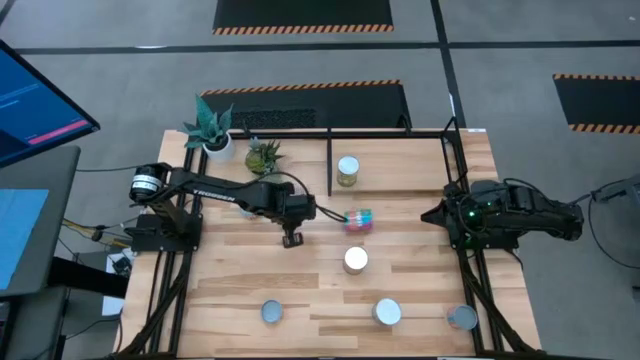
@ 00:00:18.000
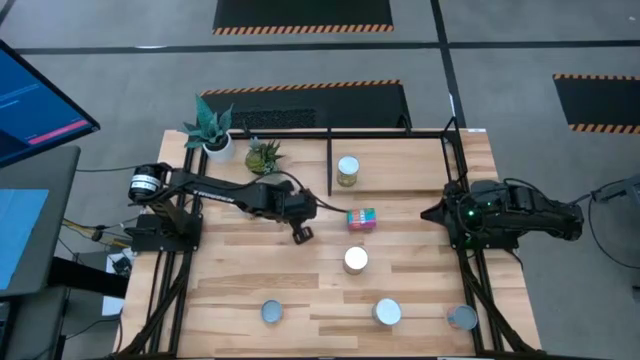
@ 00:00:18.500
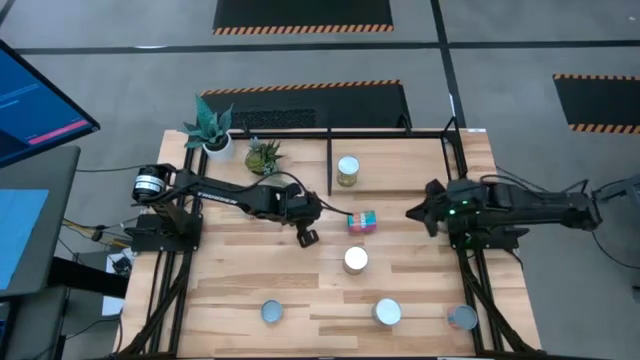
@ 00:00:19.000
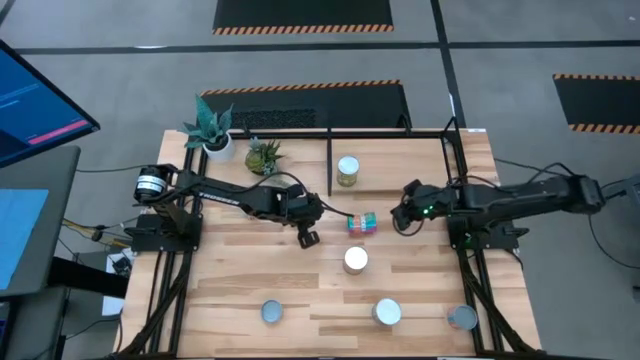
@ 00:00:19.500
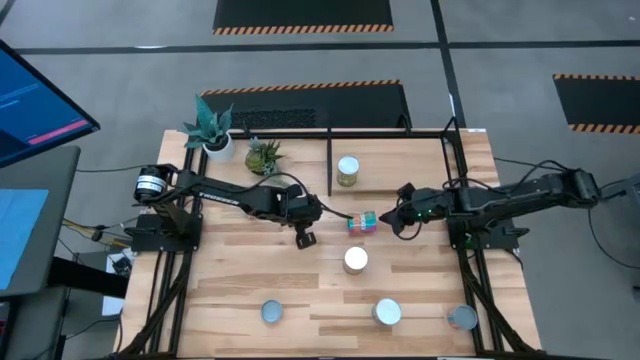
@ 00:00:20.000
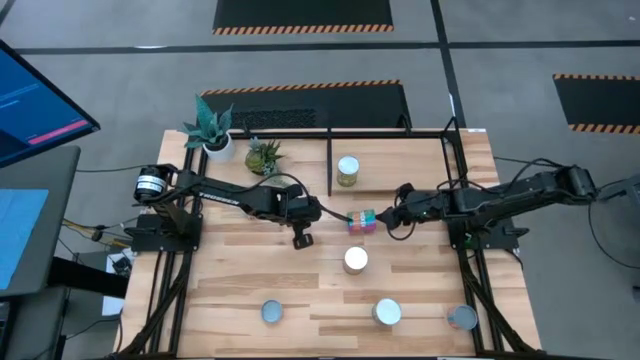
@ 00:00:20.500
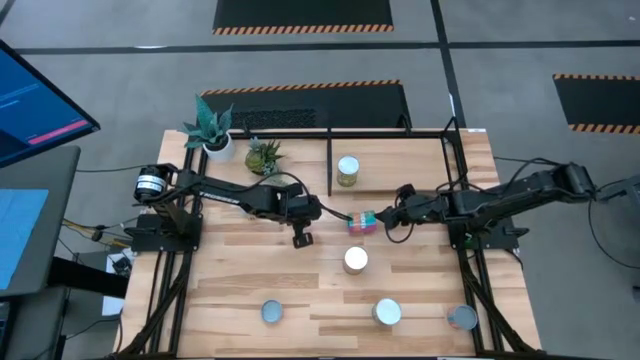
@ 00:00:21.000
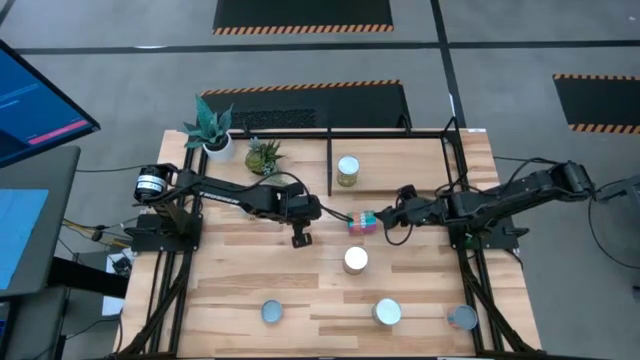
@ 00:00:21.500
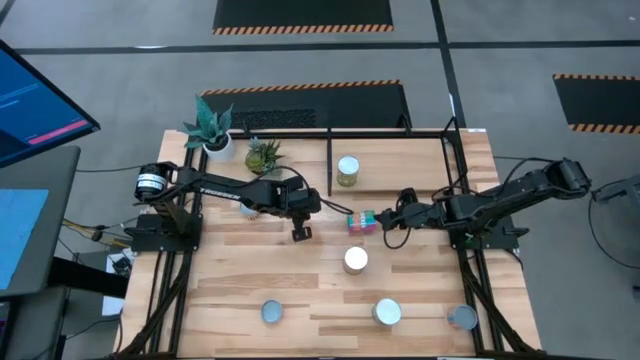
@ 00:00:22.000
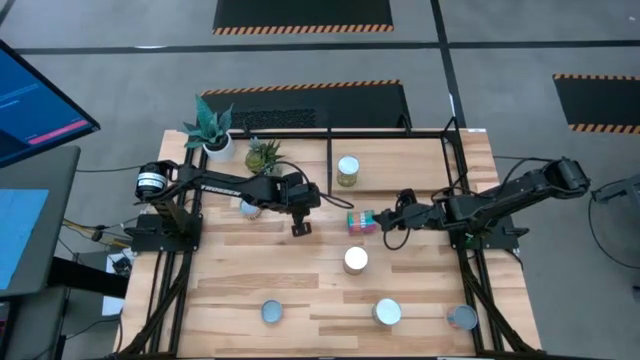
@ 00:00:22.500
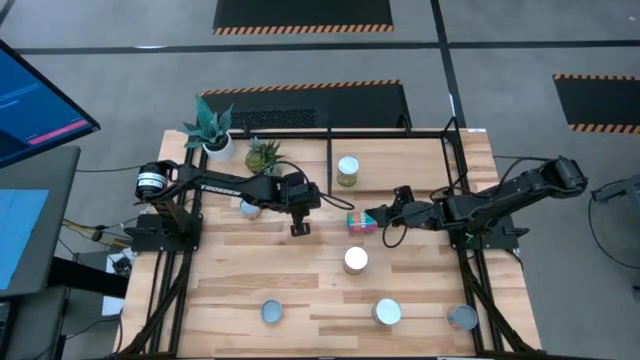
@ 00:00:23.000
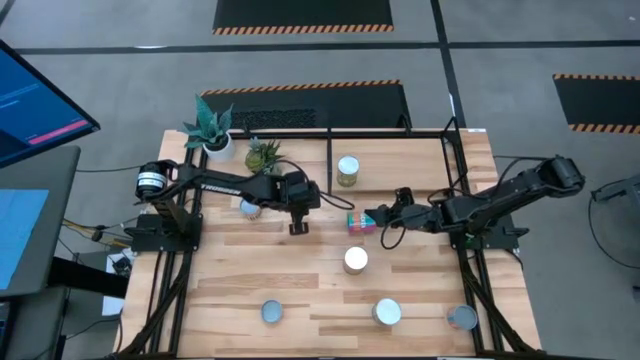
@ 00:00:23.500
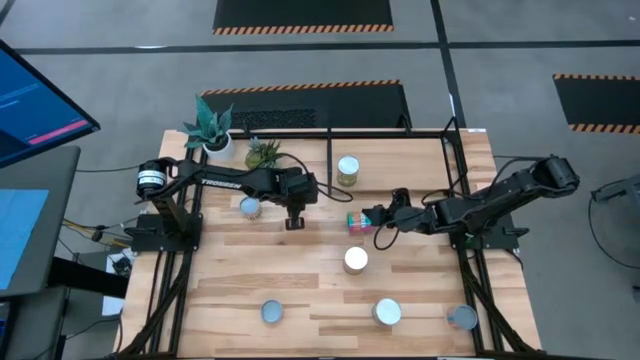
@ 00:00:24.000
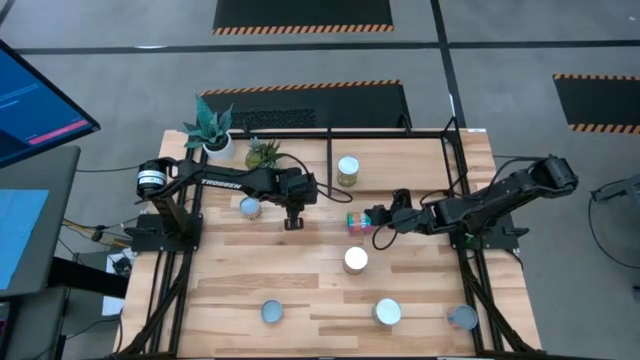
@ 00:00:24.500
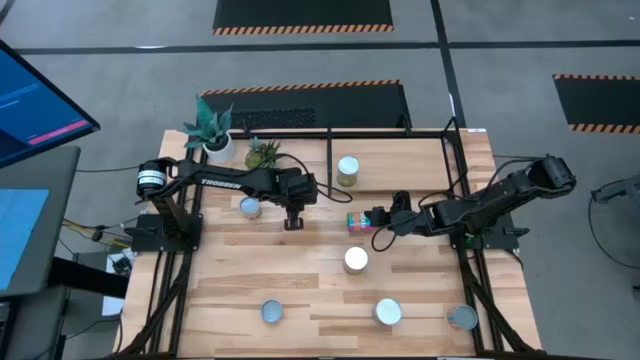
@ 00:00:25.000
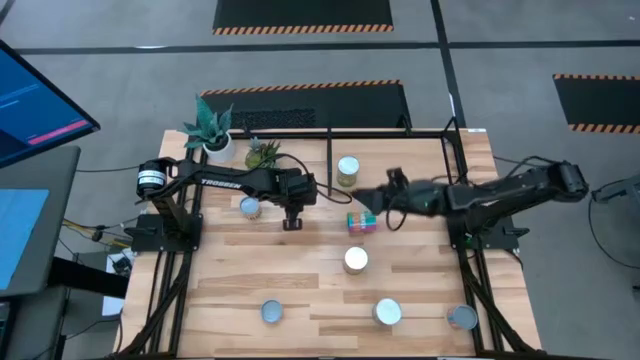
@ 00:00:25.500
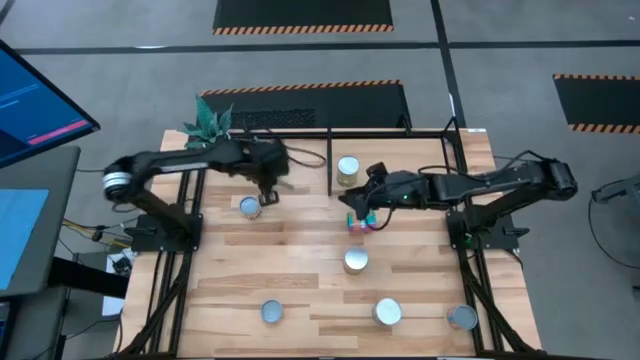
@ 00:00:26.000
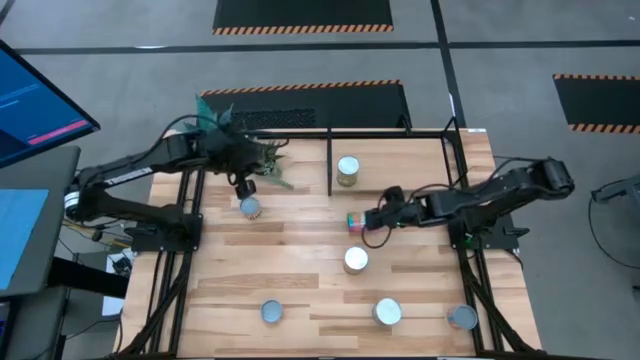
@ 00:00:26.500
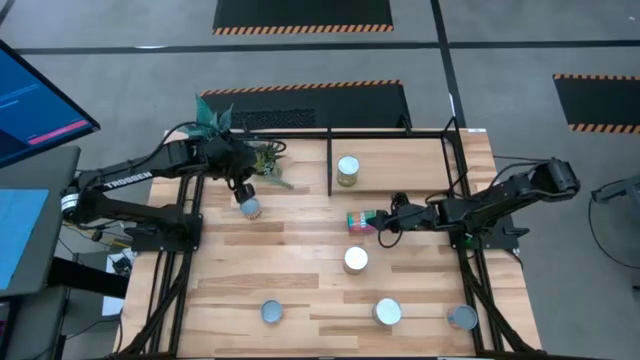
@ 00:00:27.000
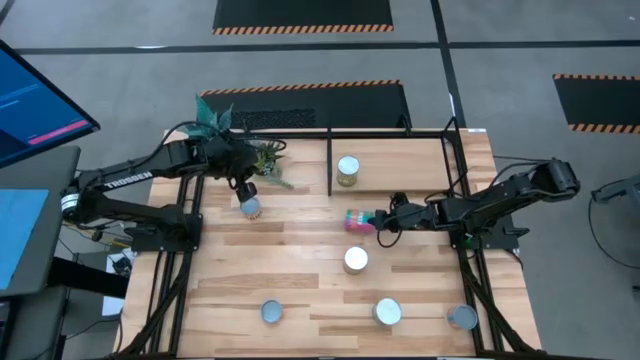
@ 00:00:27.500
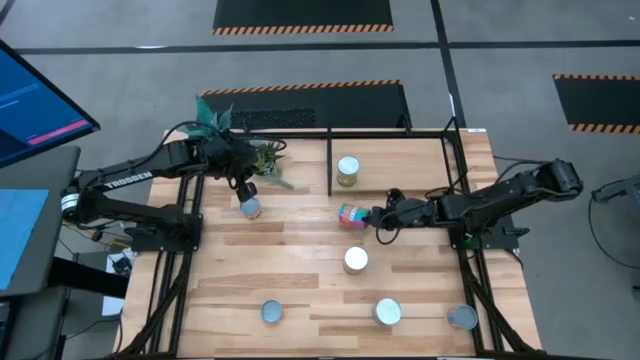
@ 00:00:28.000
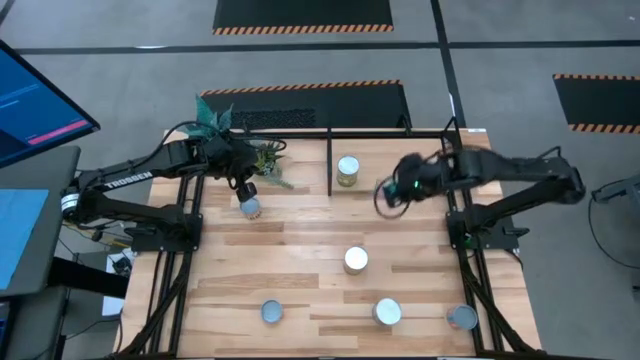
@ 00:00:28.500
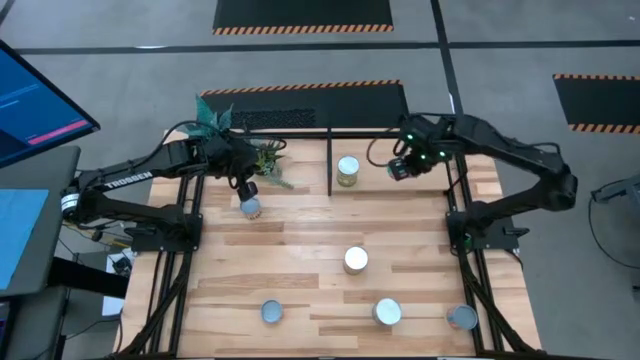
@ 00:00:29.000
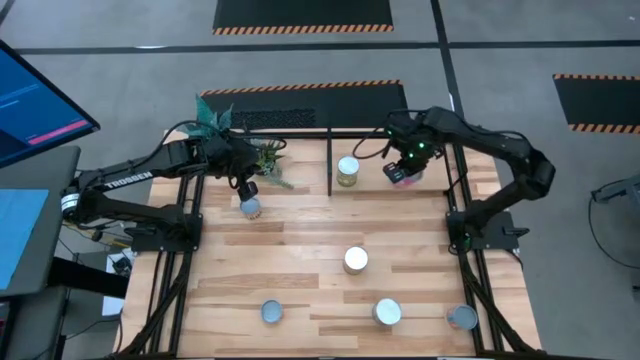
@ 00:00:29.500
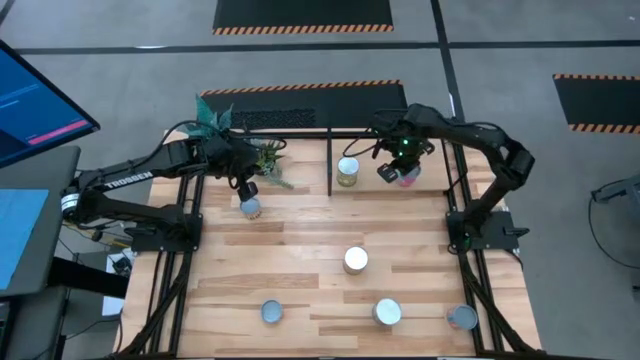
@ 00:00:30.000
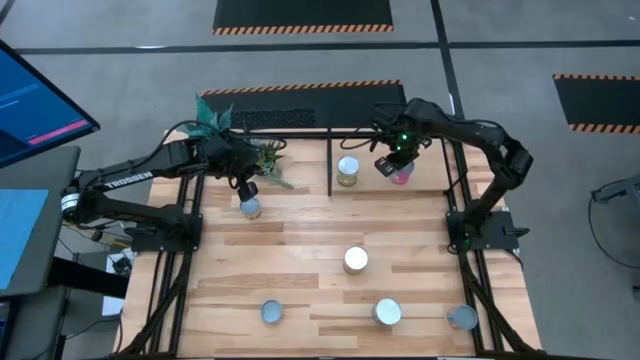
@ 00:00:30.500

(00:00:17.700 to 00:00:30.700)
Task: Pick and place cans onto a shelf
Put the canned chicken soup on the shelf

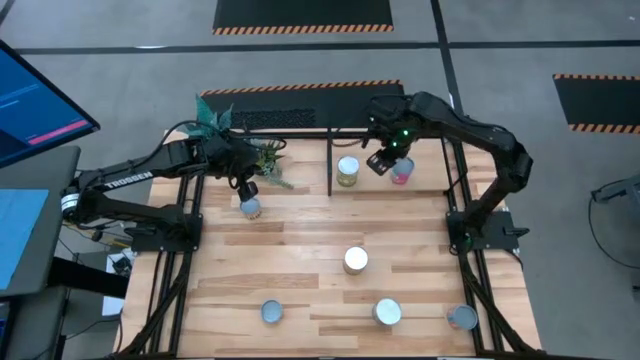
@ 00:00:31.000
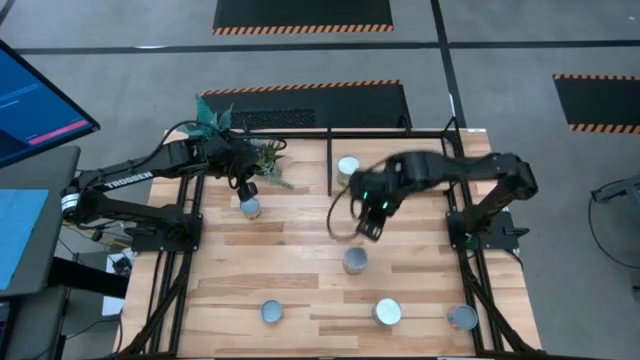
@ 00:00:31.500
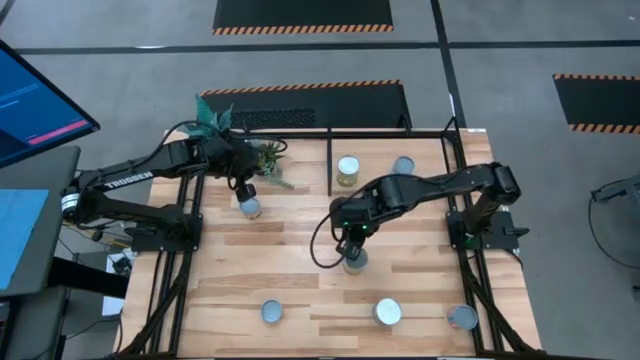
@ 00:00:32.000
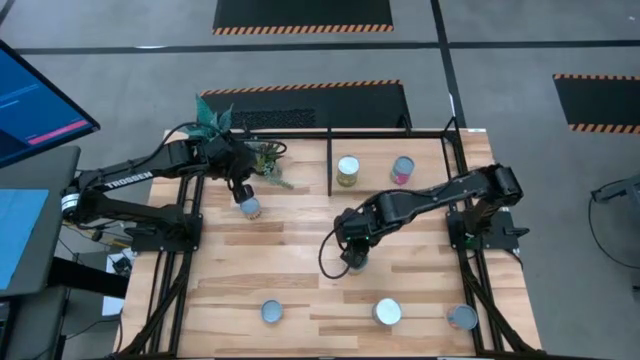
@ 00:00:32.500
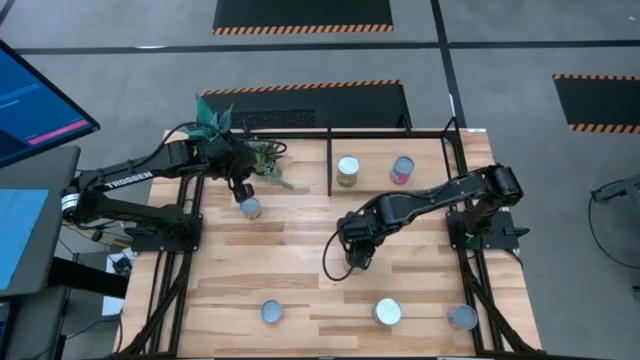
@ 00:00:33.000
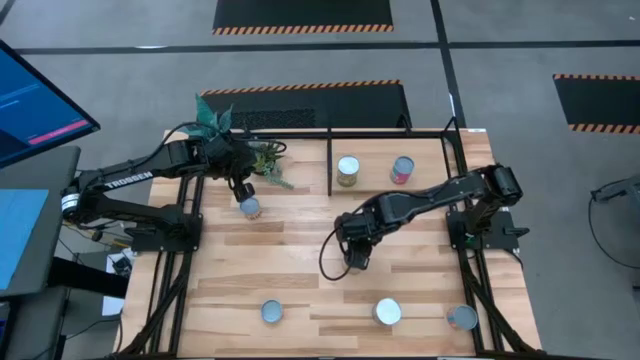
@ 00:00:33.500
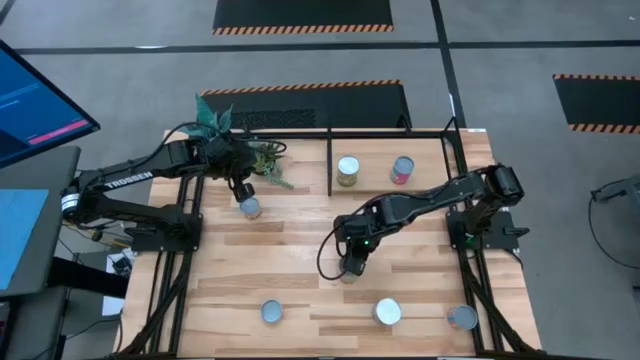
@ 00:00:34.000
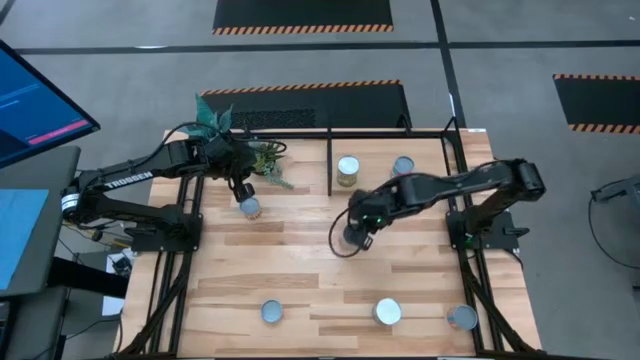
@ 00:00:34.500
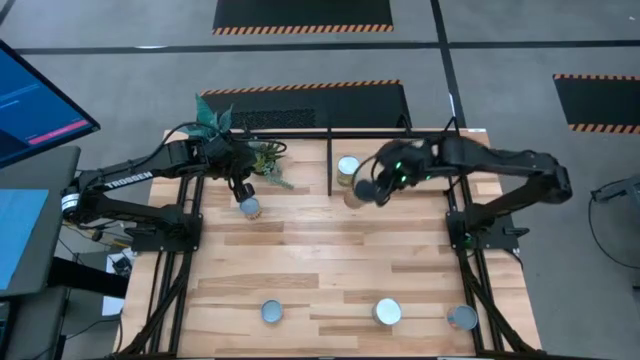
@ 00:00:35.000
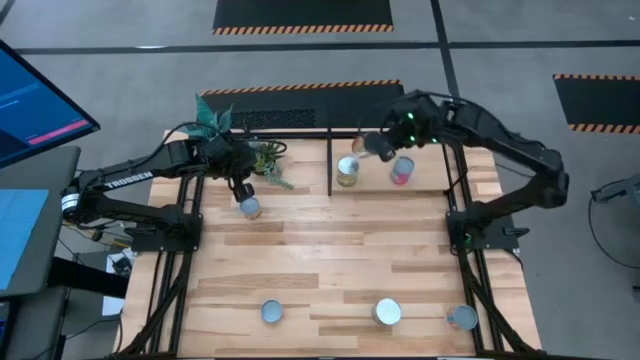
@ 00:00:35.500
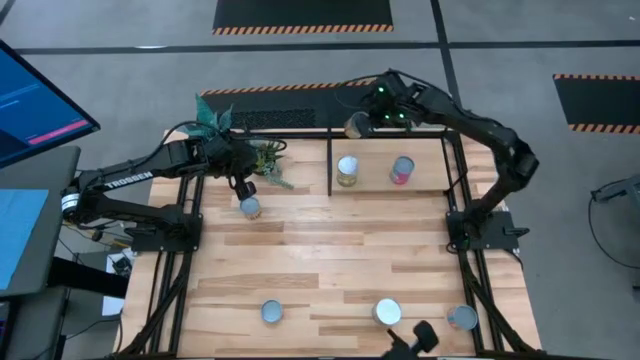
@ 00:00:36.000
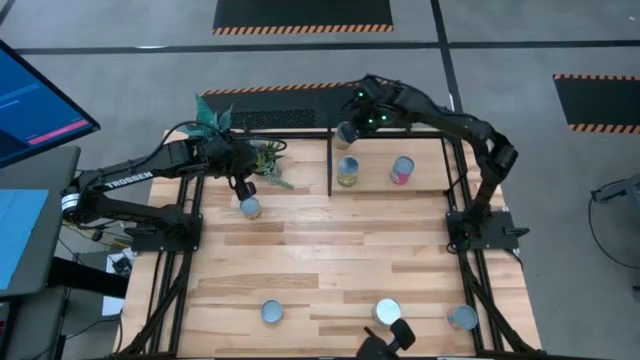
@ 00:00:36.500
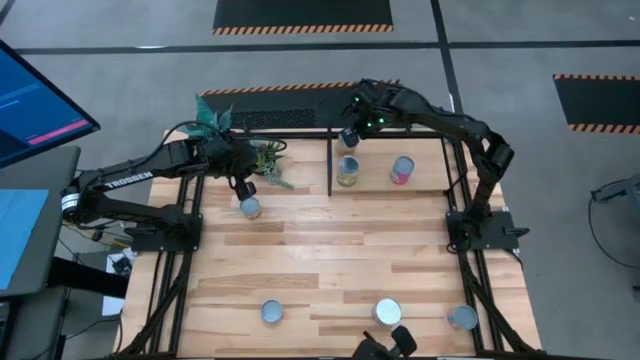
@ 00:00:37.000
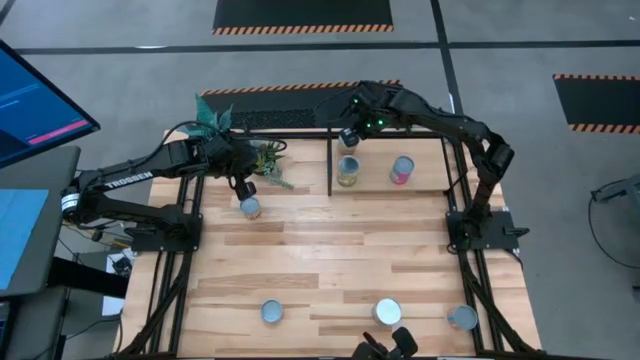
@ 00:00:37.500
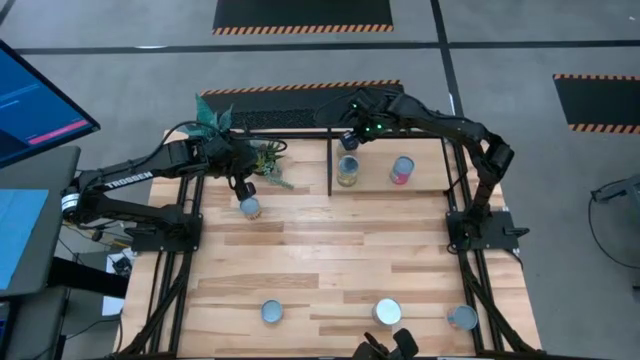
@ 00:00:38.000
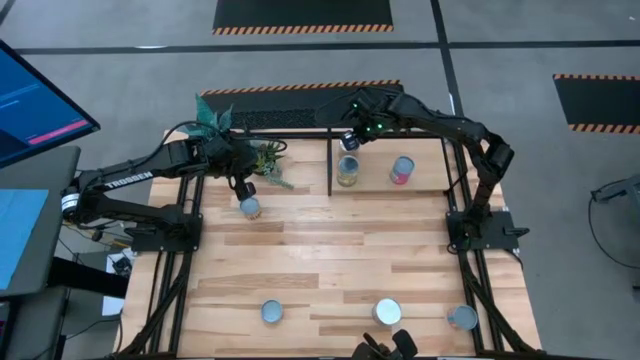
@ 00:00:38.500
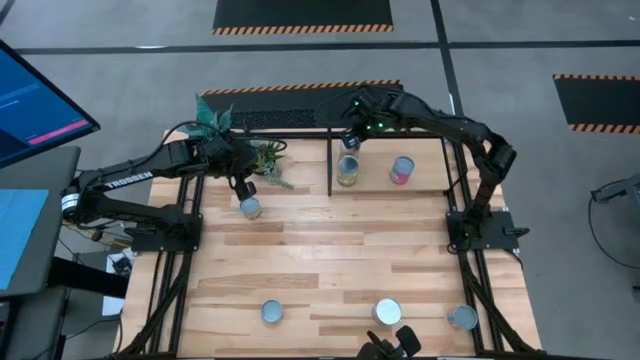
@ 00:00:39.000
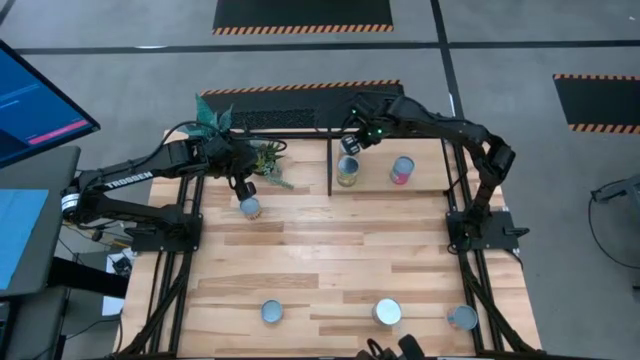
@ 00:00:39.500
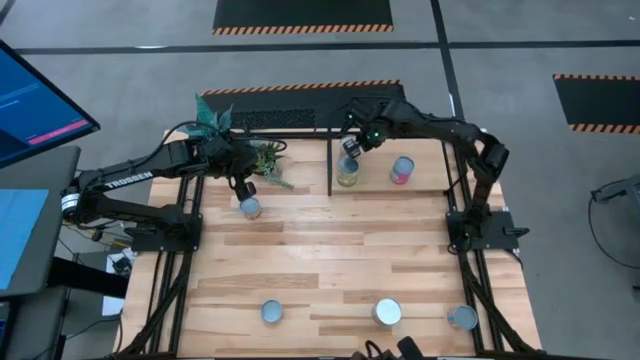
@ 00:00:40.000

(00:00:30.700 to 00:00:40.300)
Put the canned green beans on the shelf
